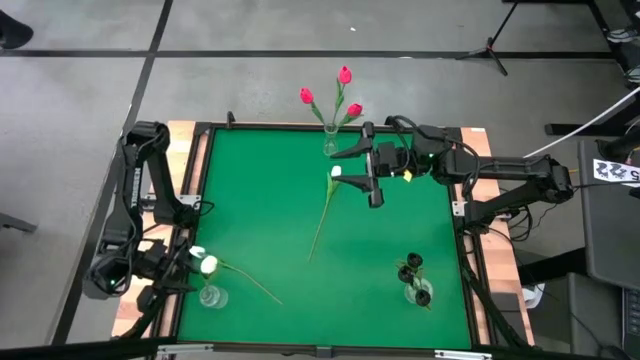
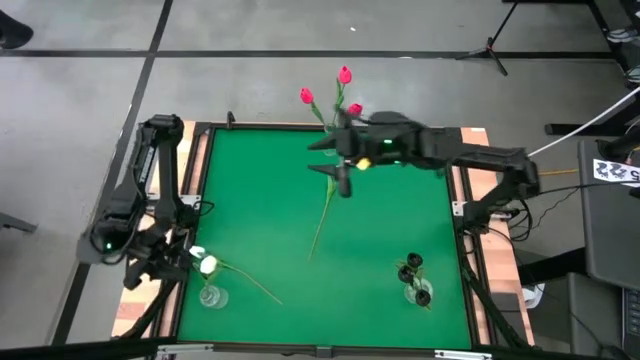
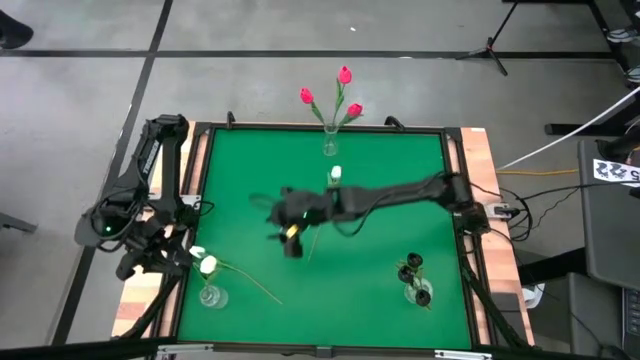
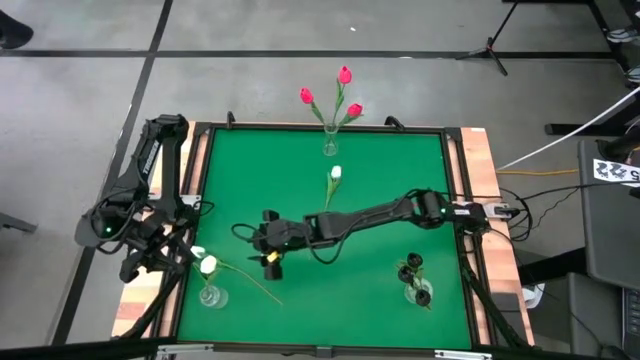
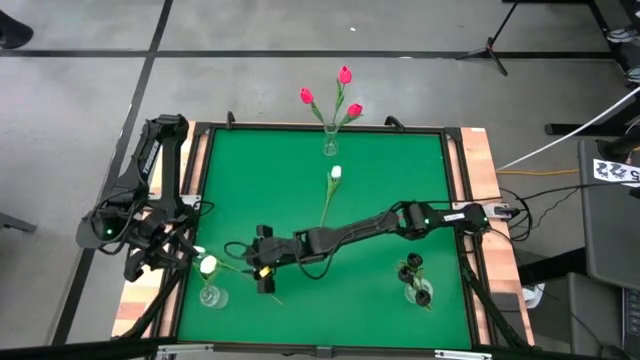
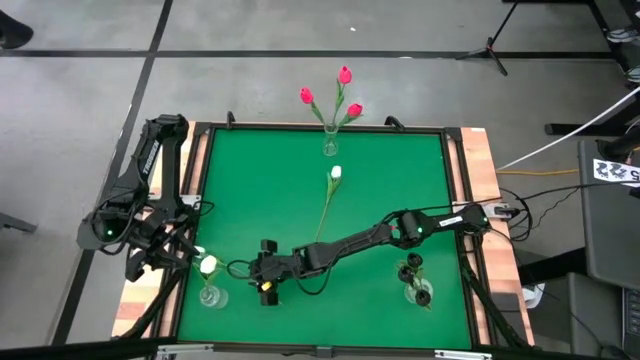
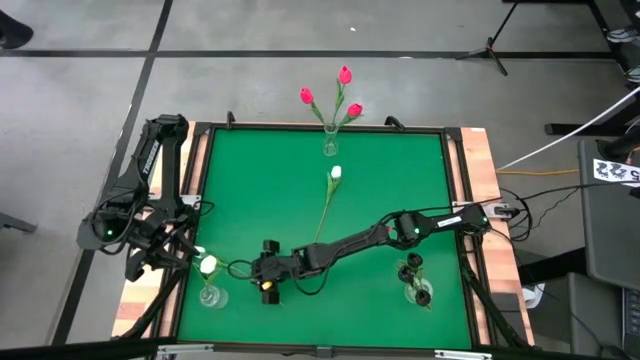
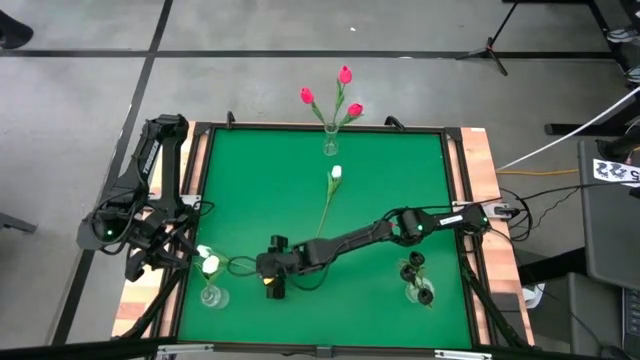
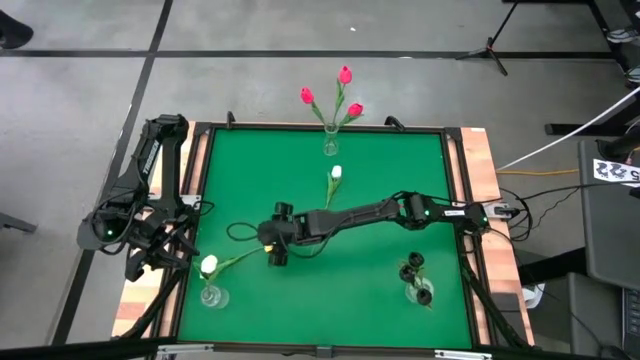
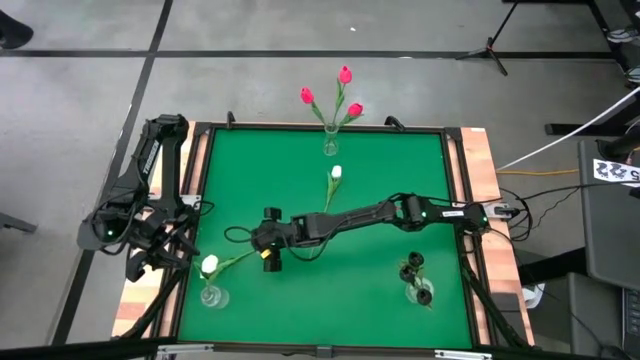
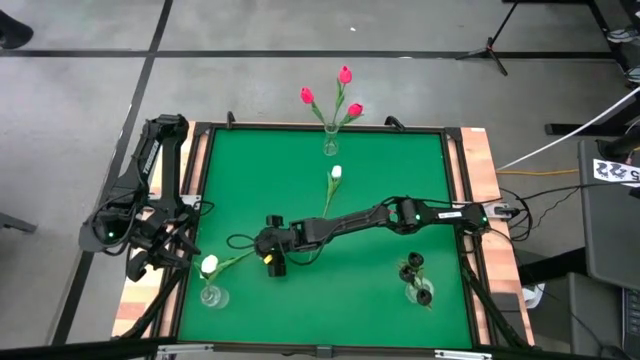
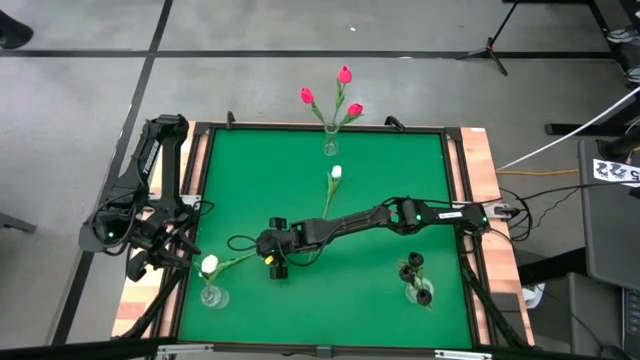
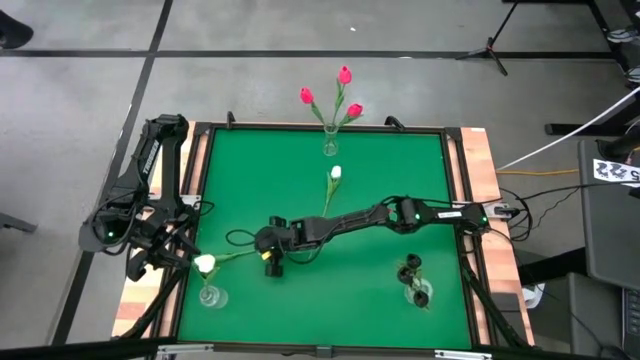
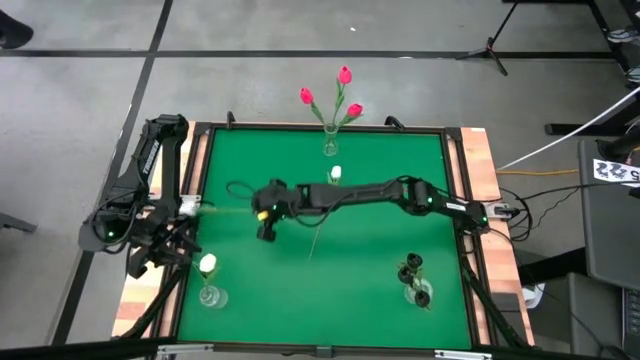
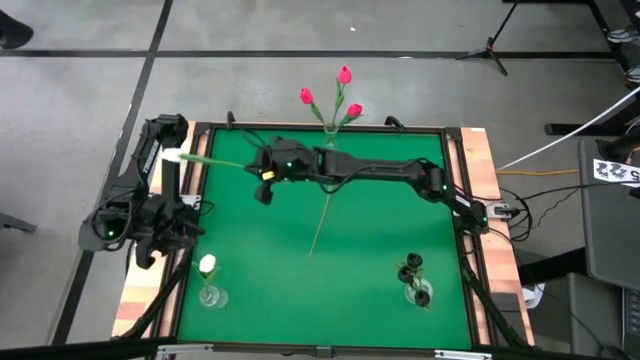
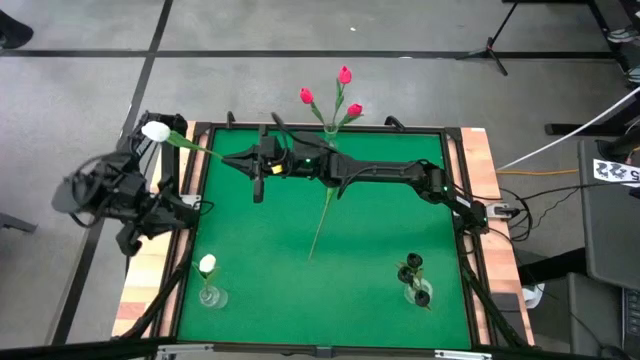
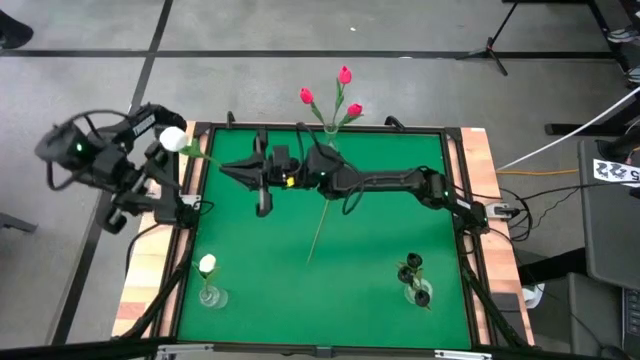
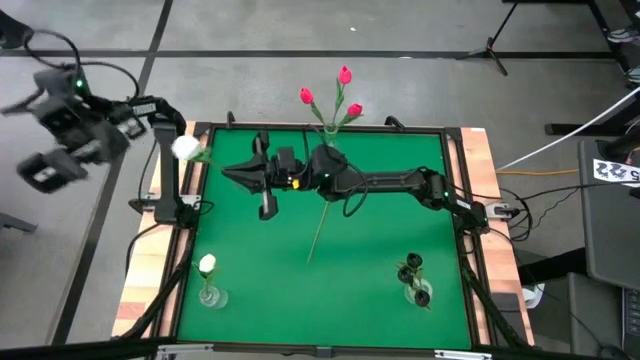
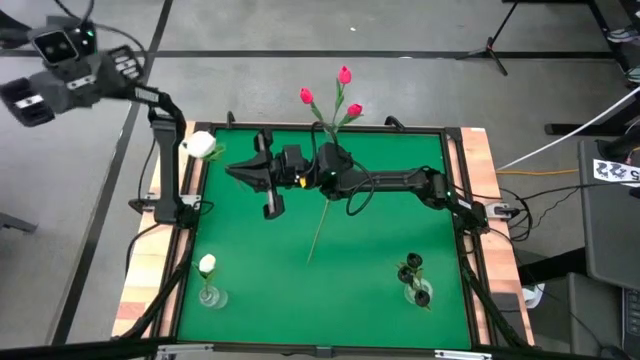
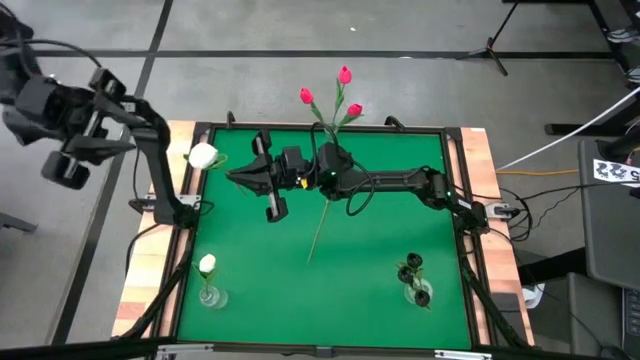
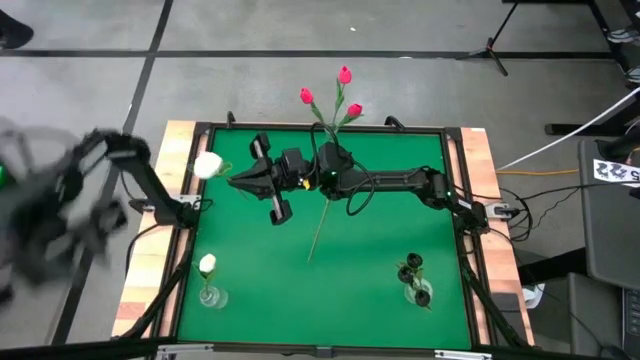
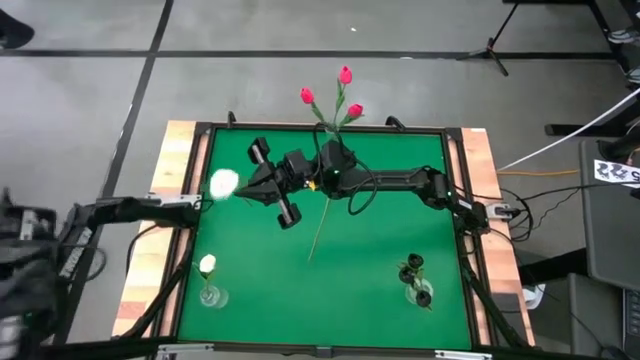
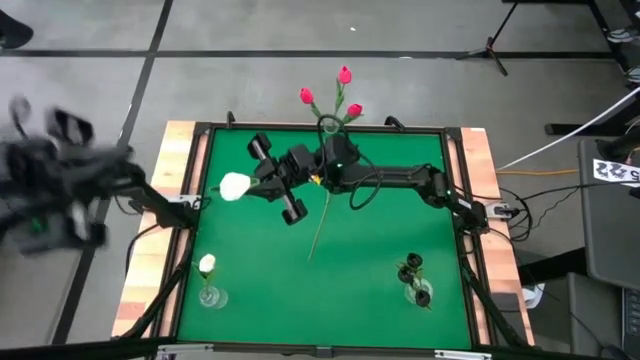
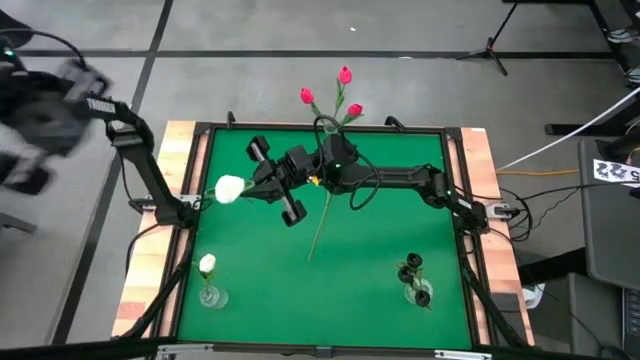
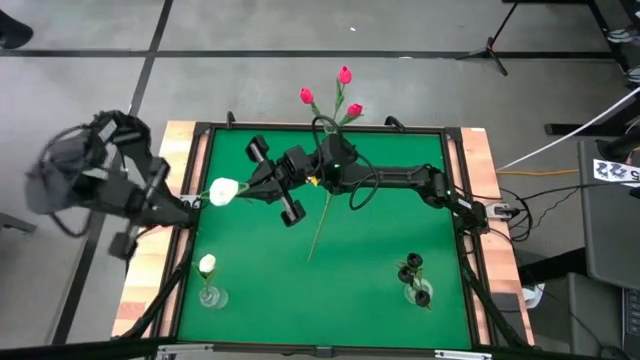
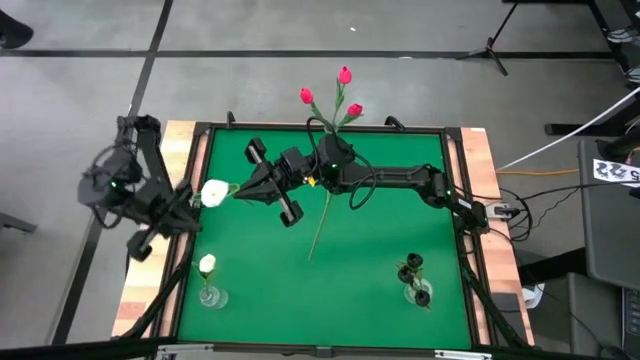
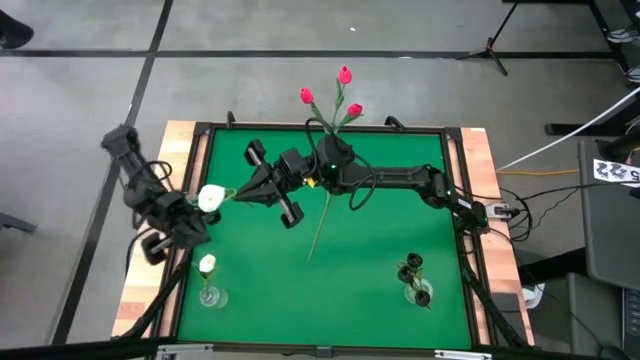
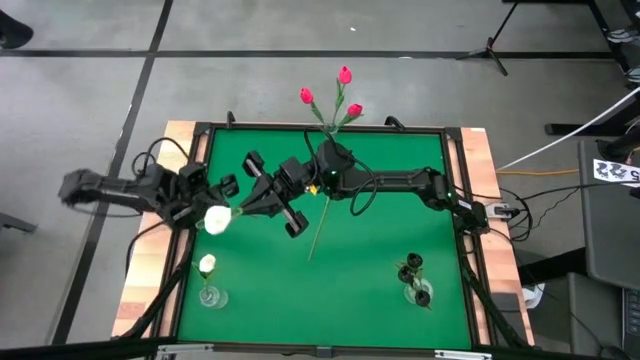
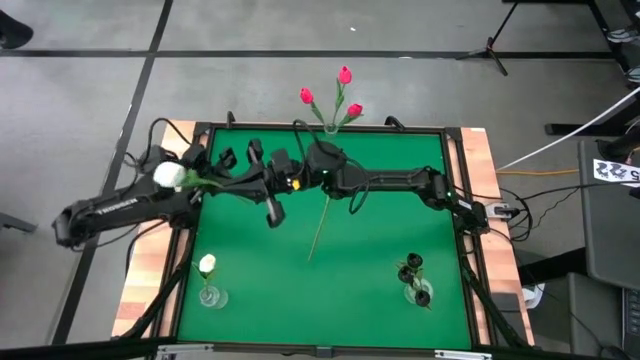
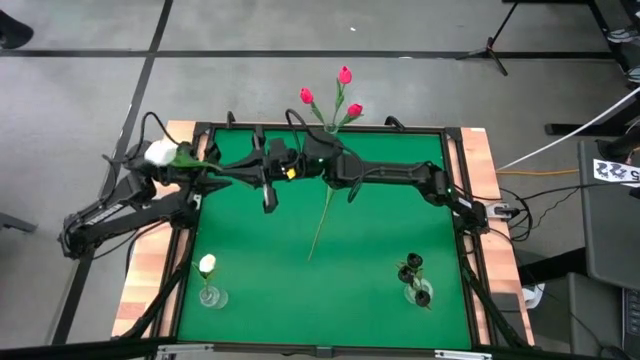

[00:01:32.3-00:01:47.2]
Task: Sort flowers into vase by color
Put the bottom white tulip into the bottom left transparent vase
